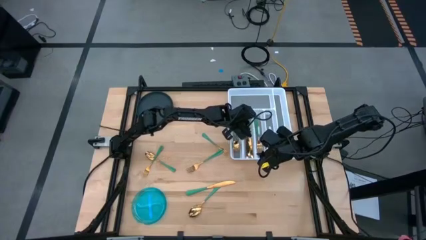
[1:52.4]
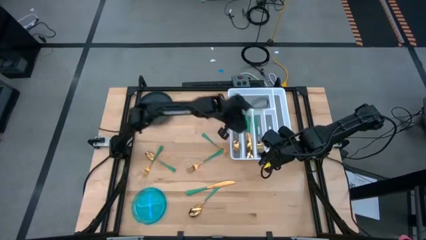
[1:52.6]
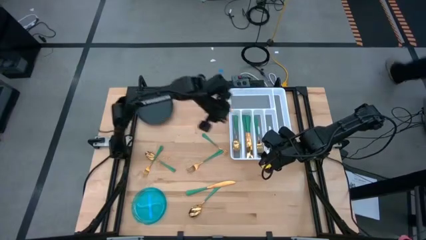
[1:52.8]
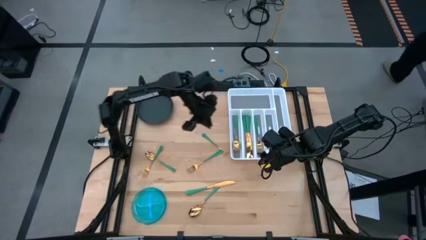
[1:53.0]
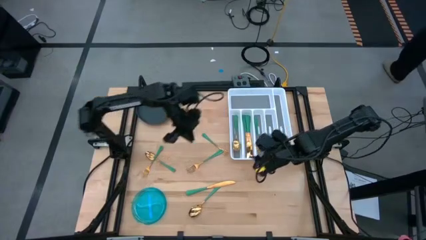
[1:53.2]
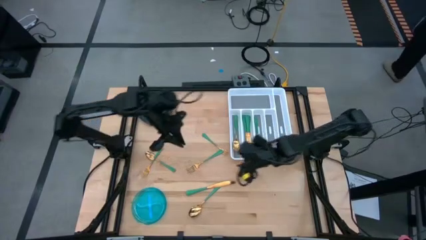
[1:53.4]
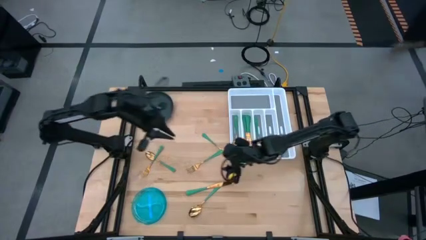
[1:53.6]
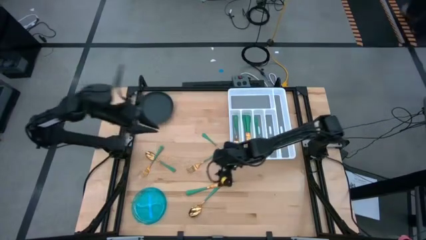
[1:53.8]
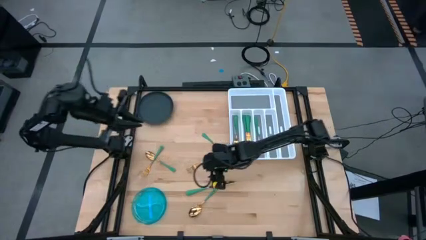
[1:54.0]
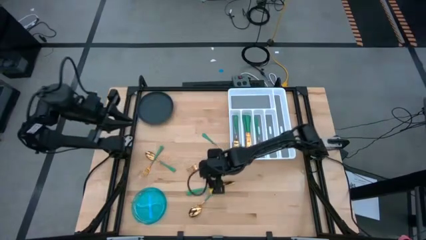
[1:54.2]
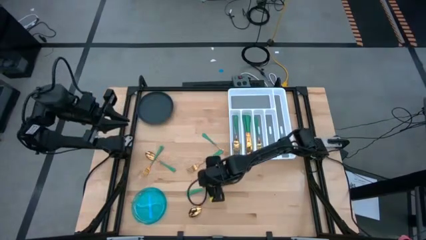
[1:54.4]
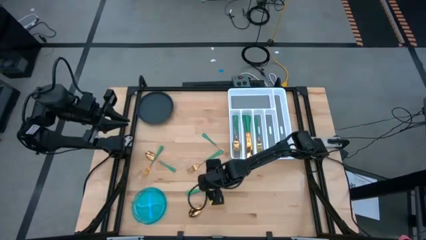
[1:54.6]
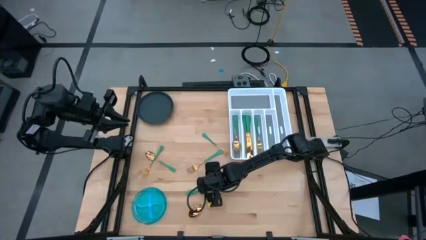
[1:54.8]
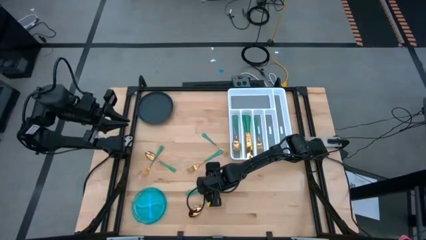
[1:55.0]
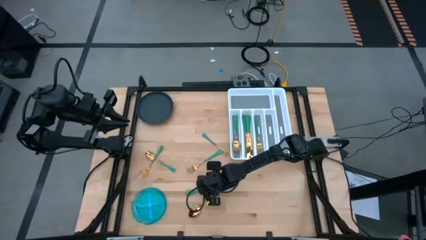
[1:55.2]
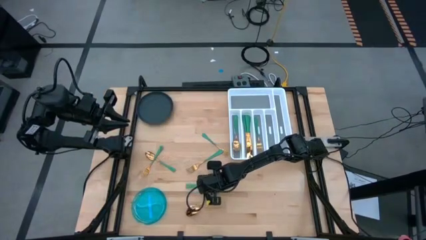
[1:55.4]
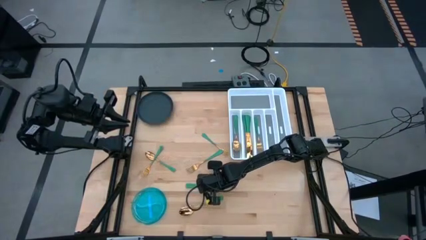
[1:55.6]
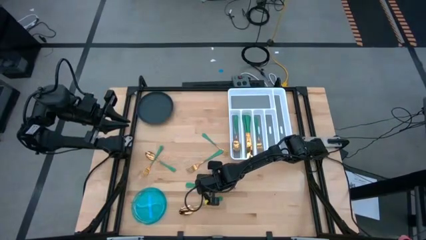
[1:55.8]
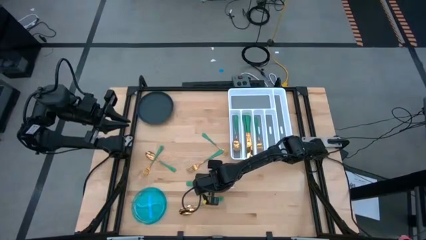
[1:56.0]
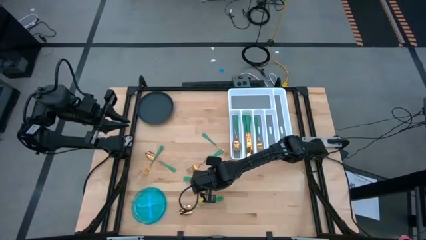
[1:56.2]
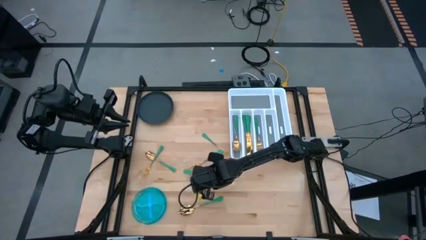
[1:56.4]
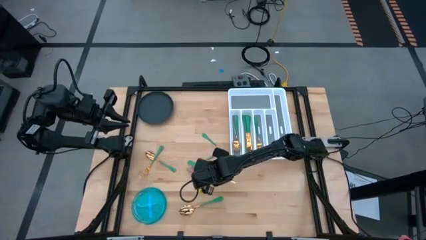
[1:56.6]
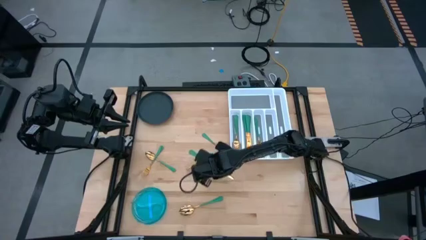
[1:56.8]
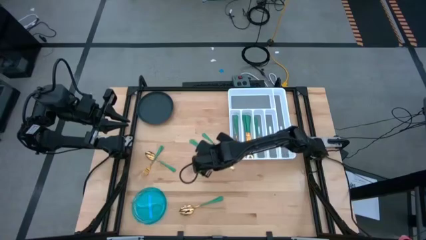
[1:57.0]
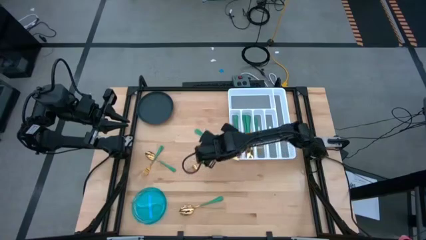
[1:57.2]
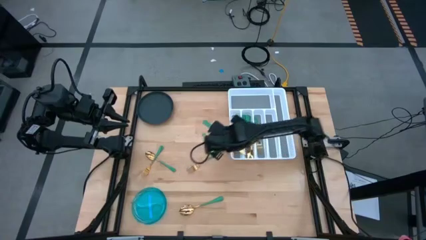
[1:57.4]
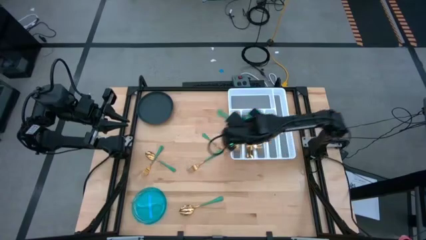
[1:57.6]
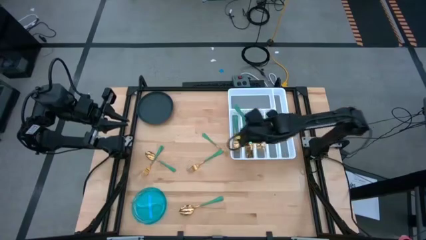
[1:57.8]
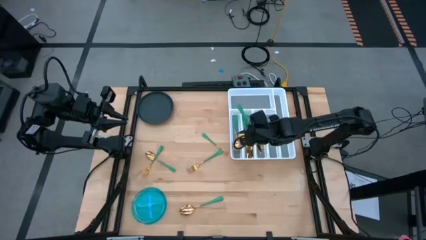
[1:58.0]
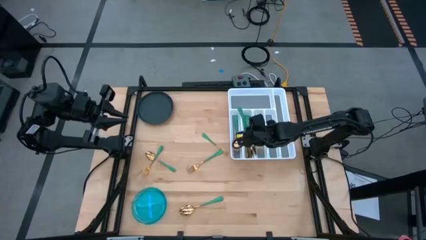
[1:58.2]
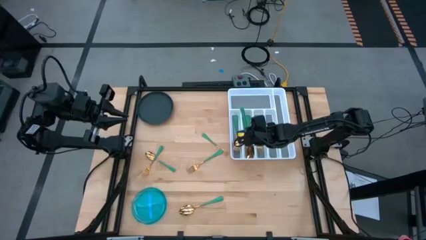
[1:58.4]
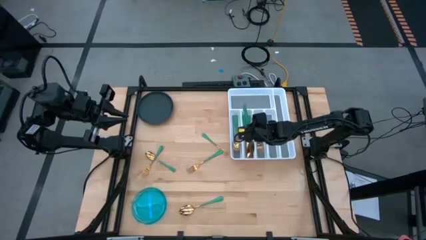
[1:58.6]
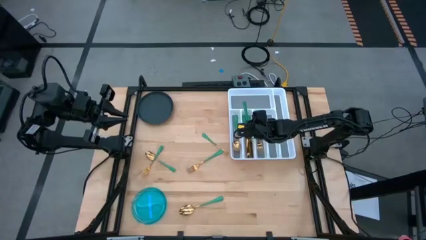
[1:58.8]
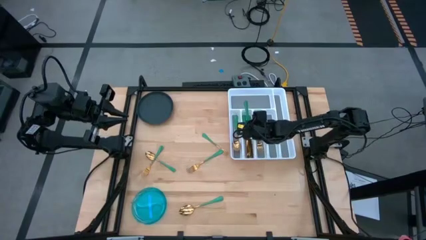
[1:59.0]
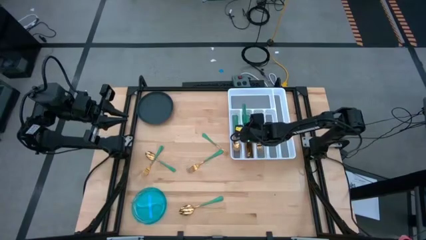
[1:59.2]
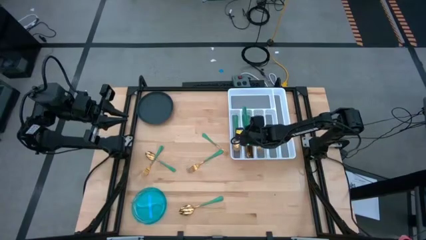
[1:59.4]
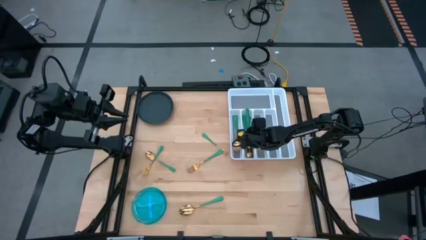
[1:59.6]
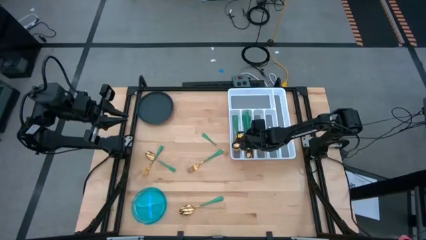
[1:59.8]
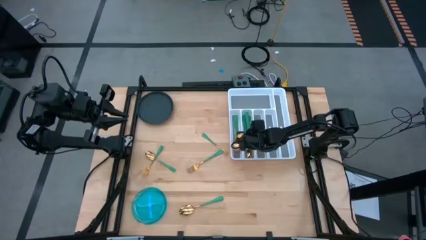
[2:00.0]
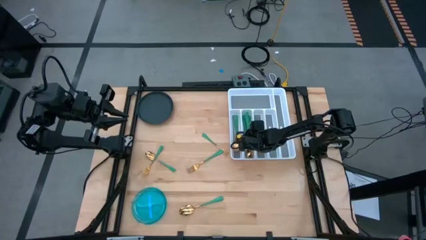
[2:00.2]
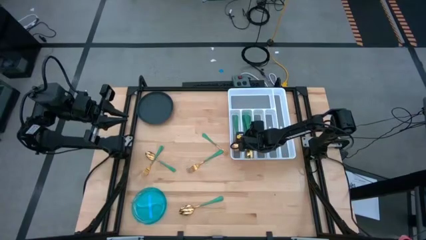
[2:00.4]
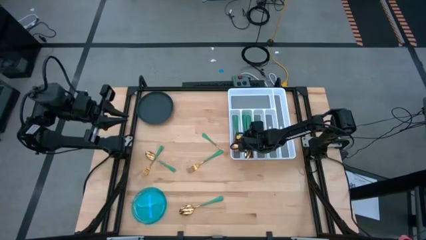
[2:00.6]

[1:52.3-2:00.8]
Task: Sort silverware
Put the green table knife into the middle left slot of the white silverware tray

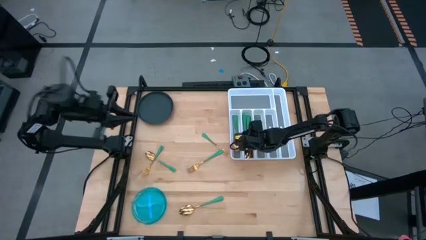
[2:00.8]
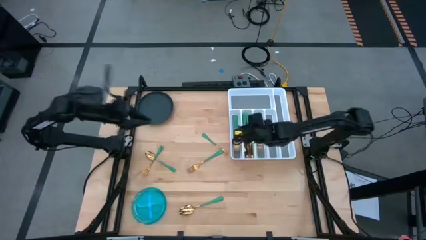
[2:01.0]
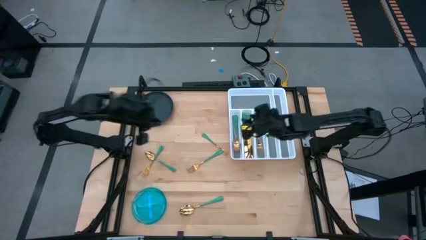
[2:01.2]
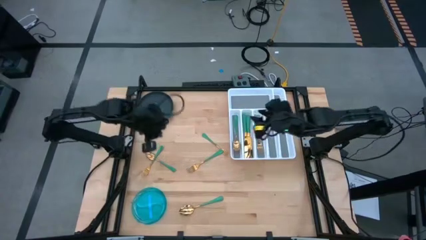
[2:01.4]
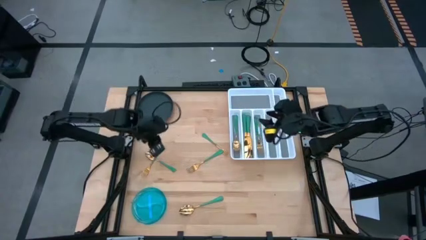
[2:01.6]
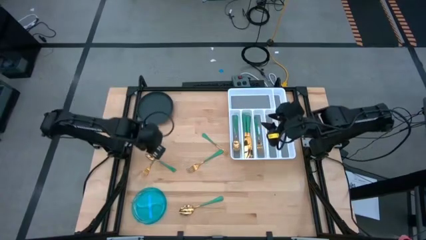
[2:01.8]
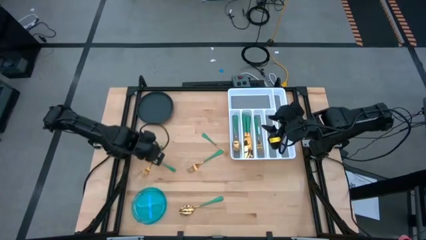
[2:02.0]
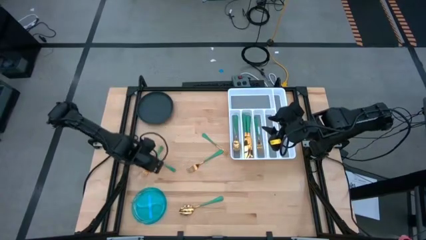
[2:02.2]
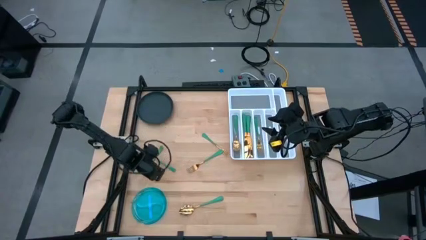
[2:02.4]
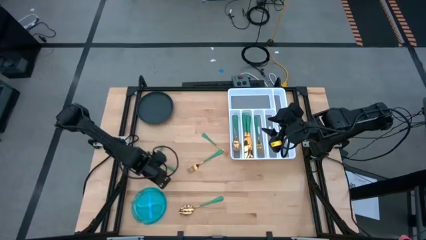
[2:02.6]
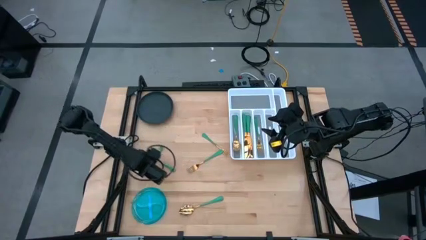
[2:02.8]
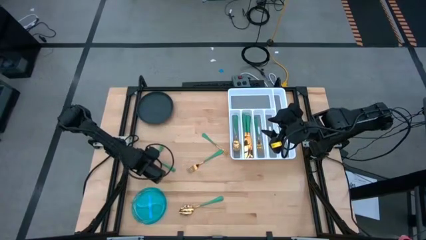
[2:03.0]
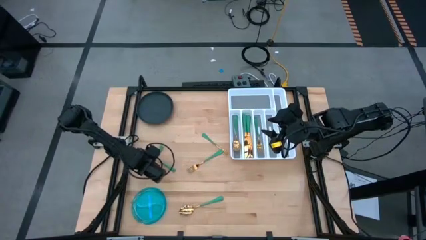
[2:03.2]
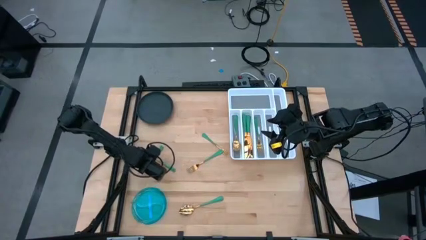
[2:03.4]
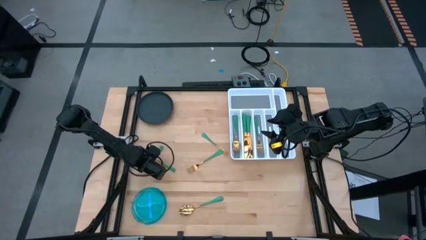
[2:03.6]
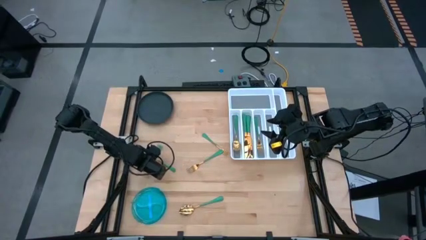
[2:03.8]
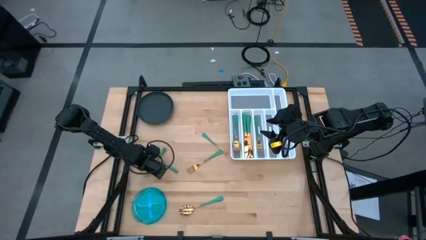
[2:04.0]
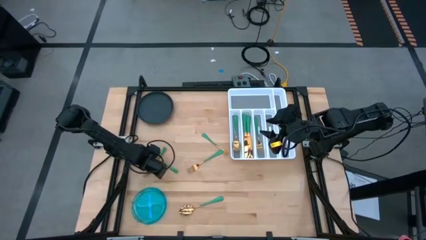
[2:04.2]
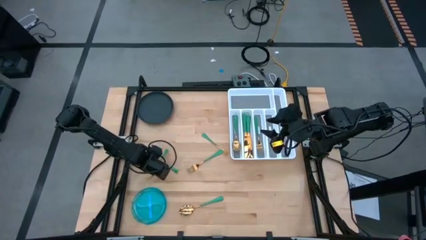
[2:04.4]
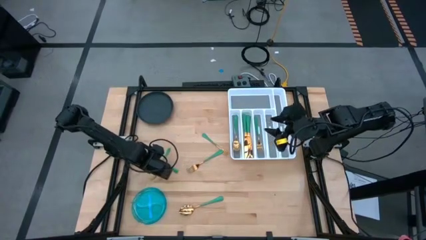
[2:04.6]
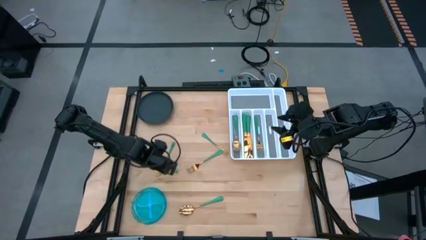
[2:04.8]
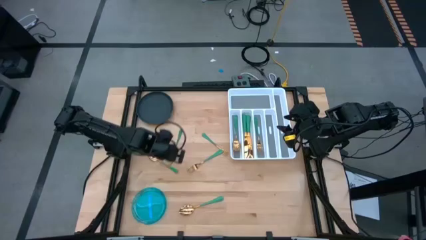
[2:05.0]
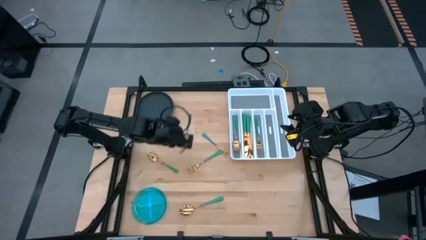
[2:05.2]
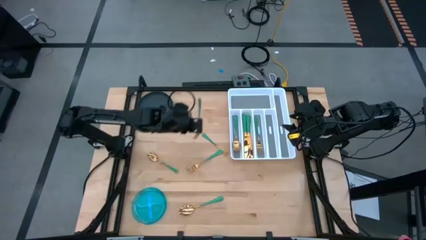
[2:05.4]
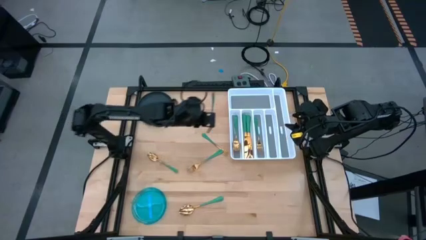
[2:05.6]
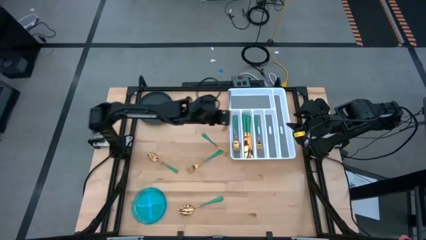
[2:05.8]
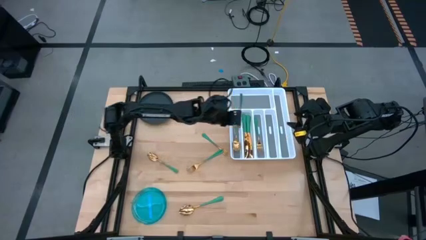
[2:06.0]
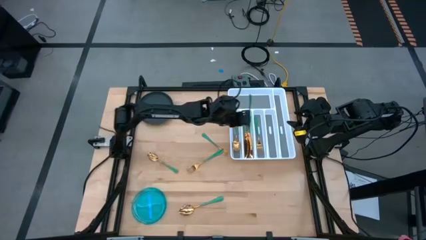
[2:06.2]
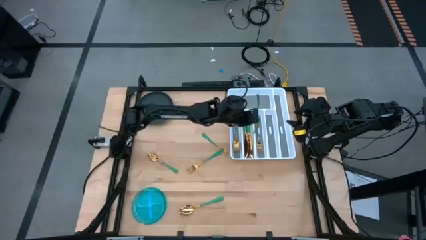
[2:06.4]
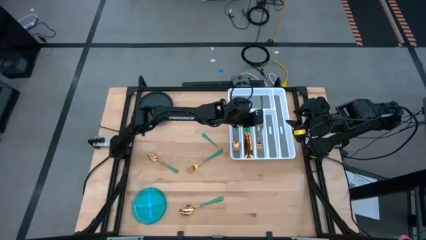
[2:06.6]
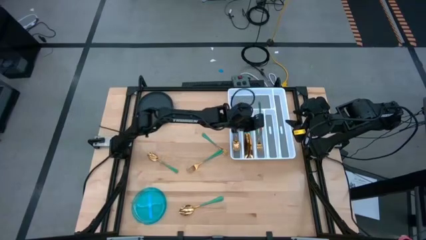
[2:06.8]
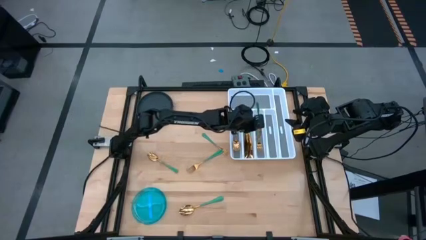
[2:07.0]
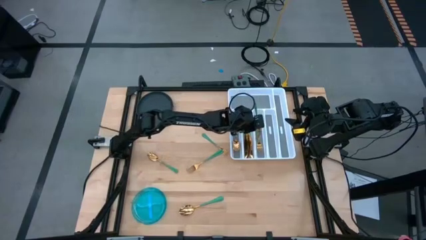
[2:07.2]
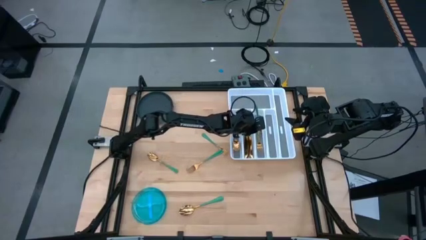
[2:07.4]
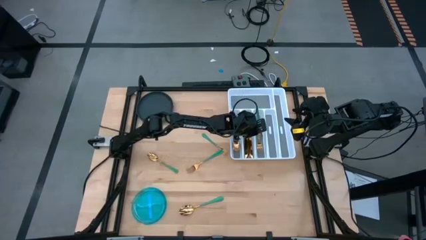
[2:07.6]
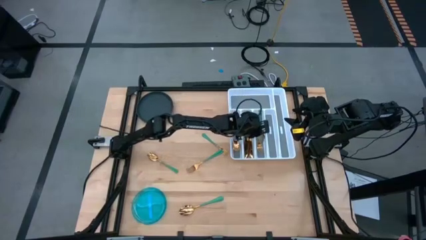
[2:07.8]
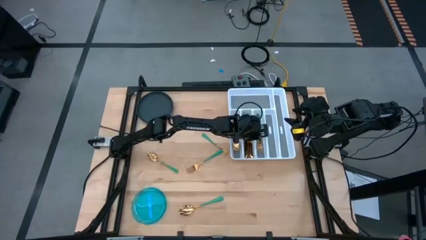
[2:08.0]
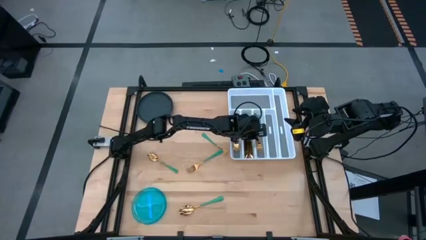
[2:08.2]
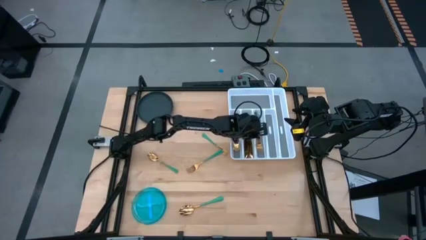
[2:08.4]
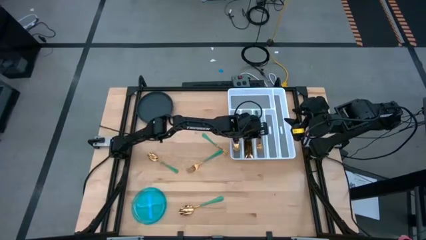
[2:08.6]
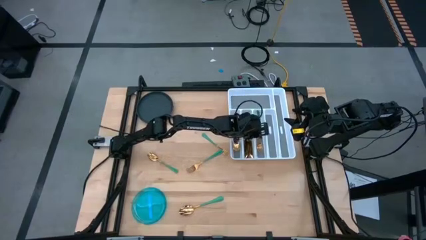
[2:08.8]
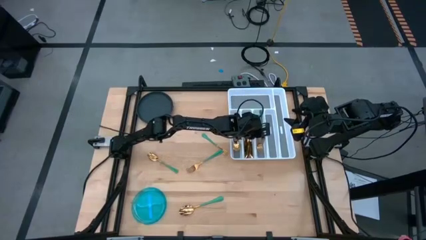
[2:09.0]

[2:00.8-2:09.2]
Put the left green fork into the middle right slot of the white silverware tray
